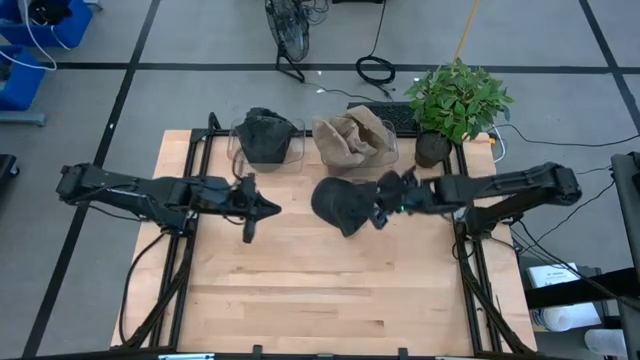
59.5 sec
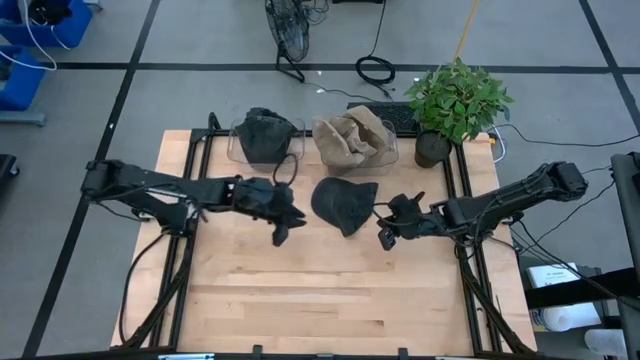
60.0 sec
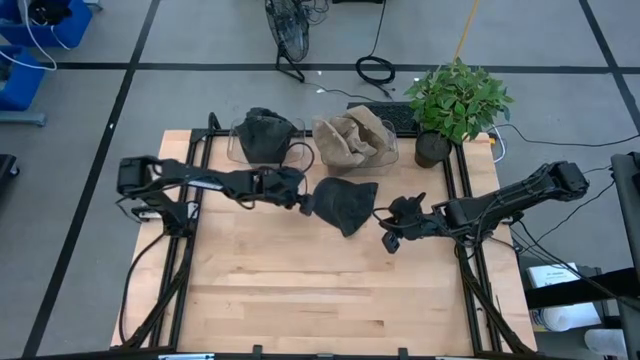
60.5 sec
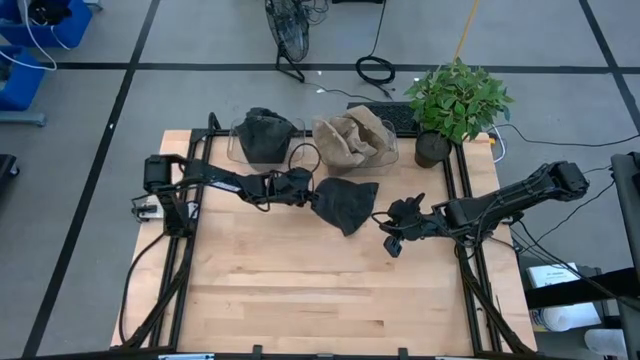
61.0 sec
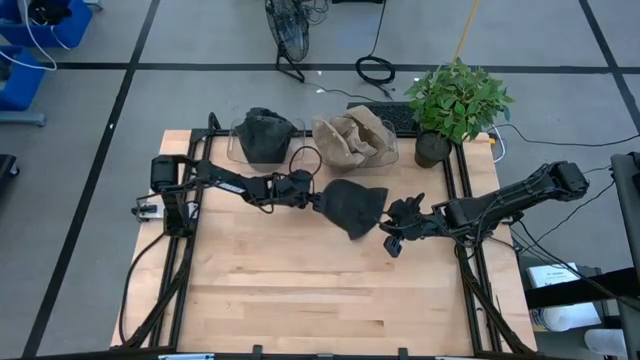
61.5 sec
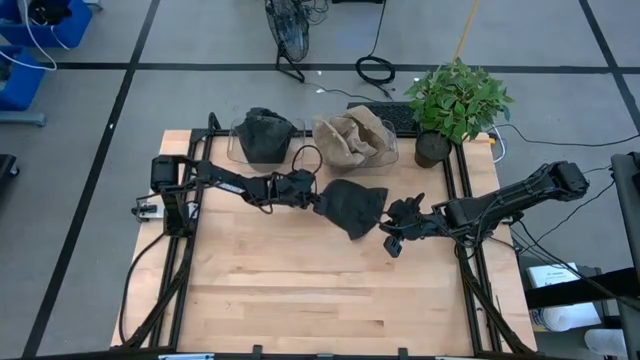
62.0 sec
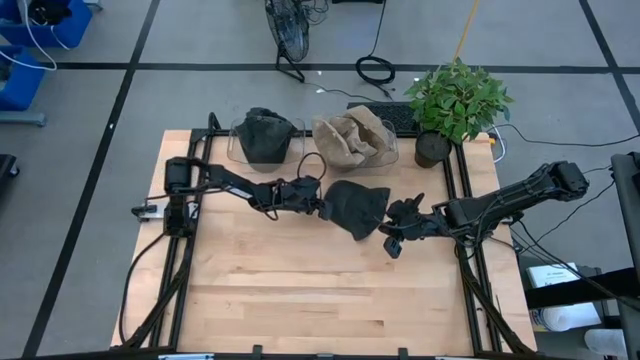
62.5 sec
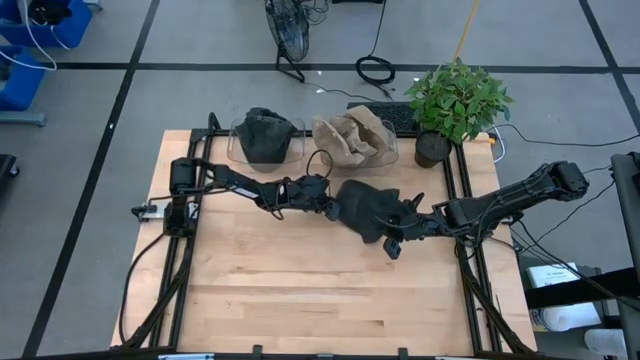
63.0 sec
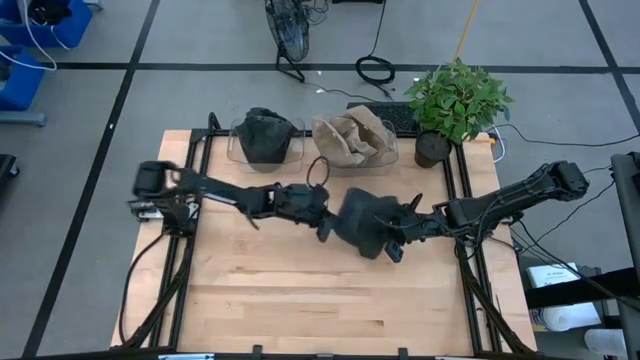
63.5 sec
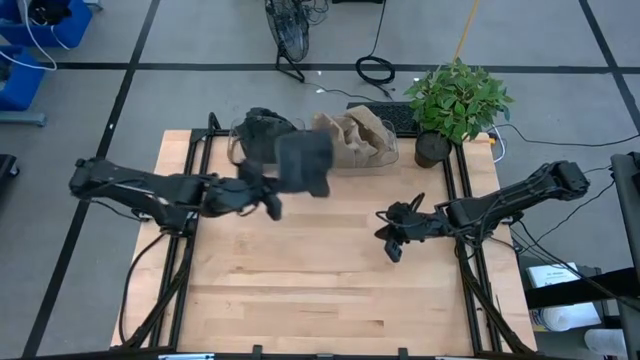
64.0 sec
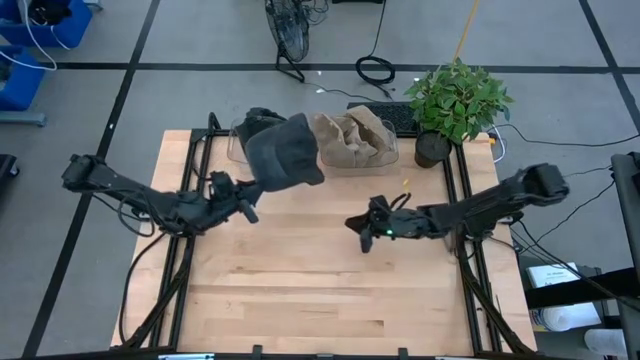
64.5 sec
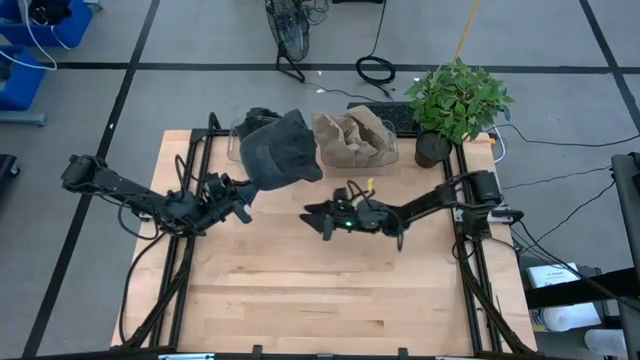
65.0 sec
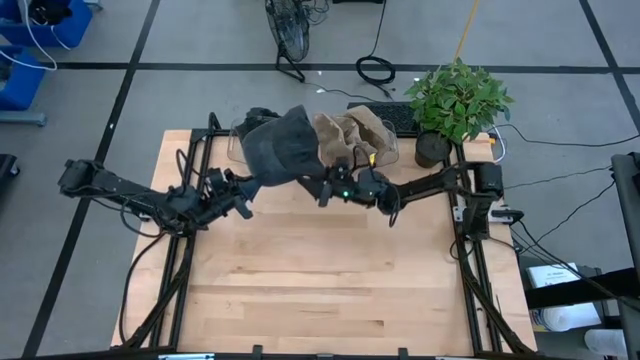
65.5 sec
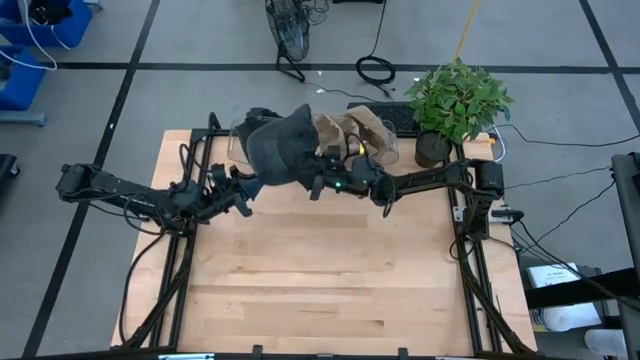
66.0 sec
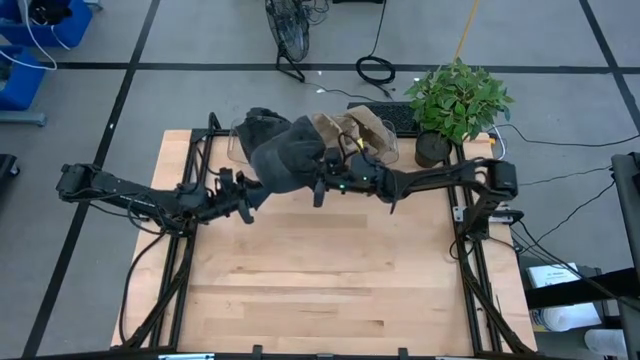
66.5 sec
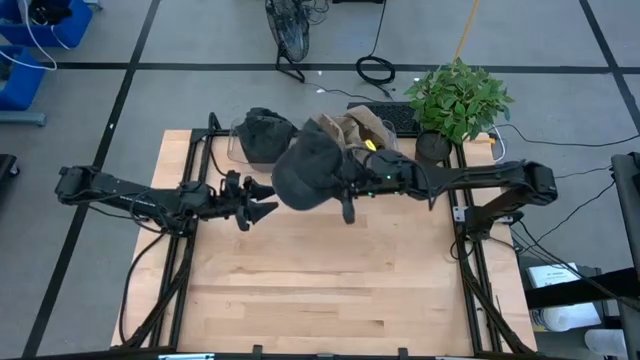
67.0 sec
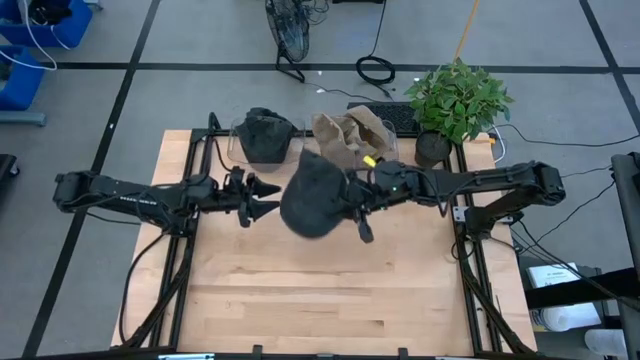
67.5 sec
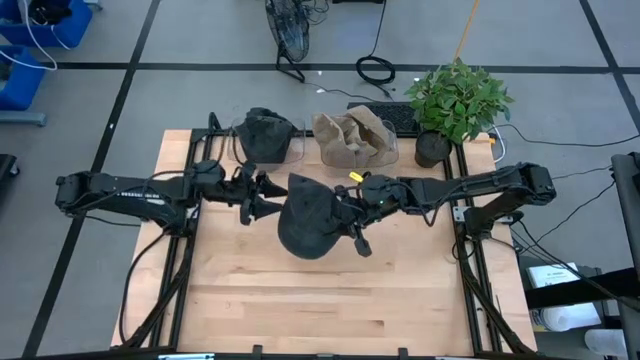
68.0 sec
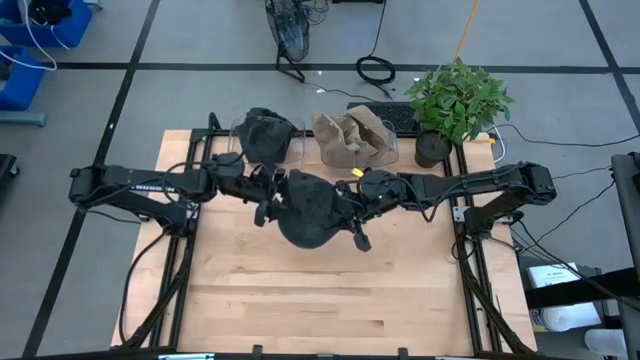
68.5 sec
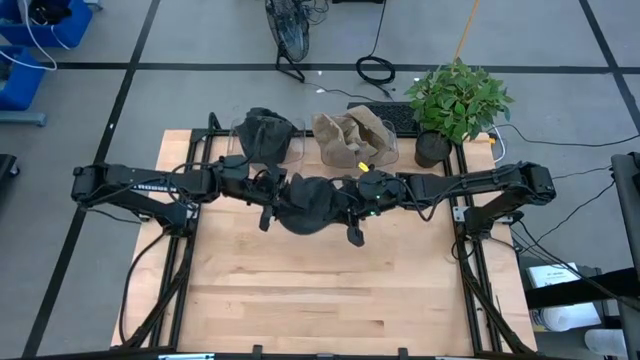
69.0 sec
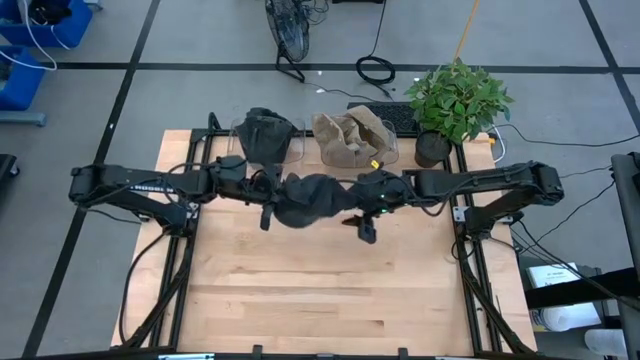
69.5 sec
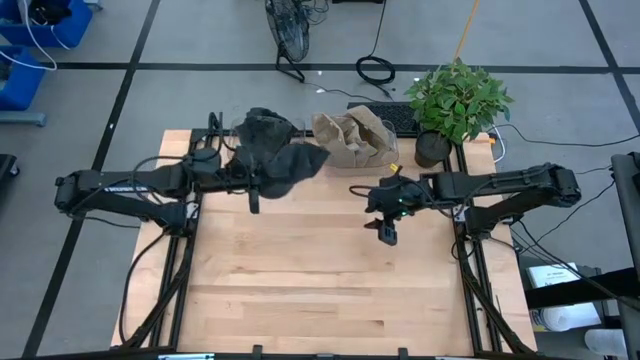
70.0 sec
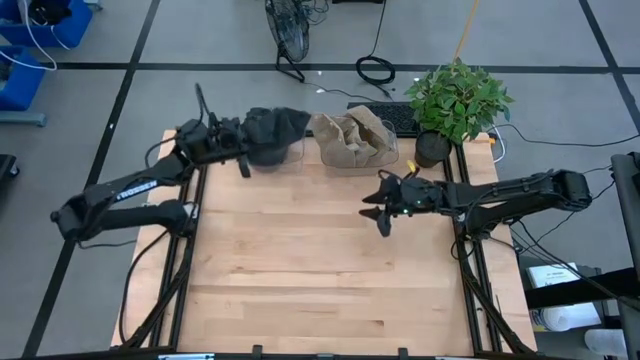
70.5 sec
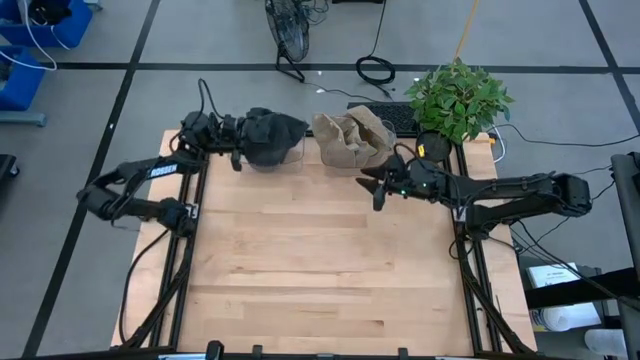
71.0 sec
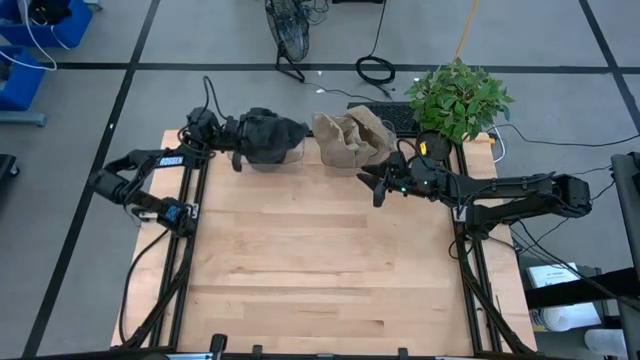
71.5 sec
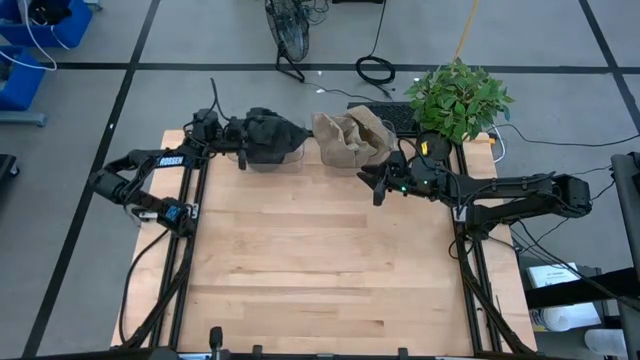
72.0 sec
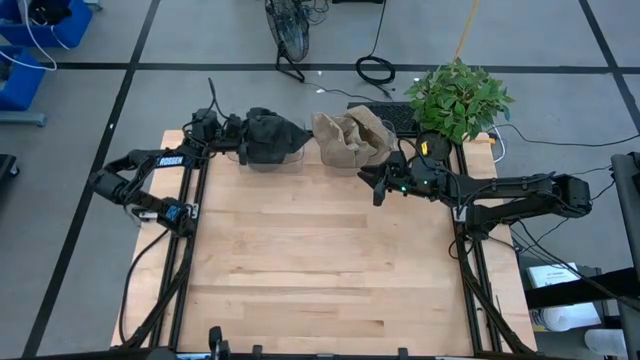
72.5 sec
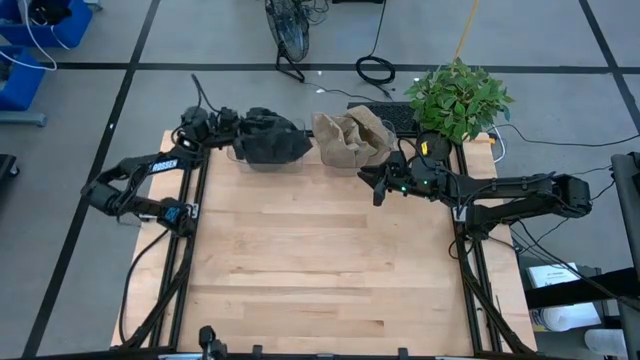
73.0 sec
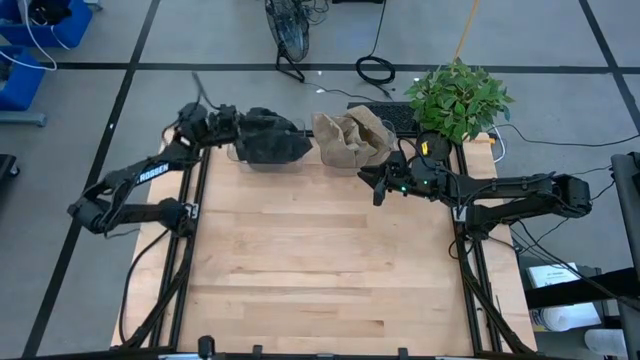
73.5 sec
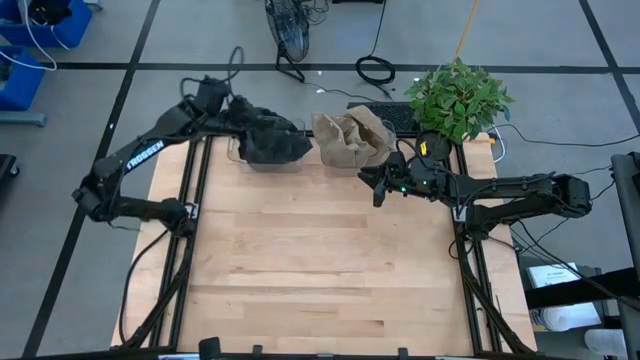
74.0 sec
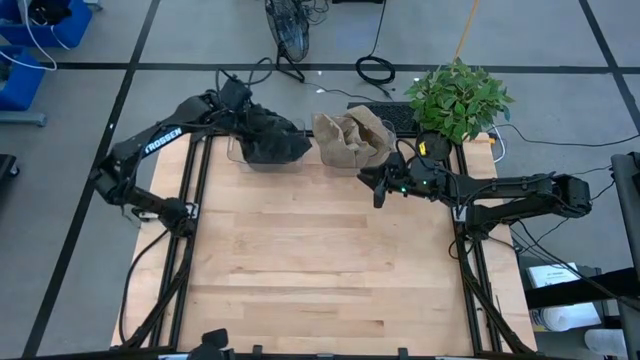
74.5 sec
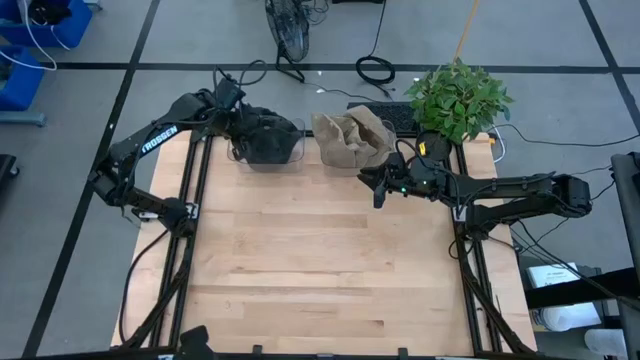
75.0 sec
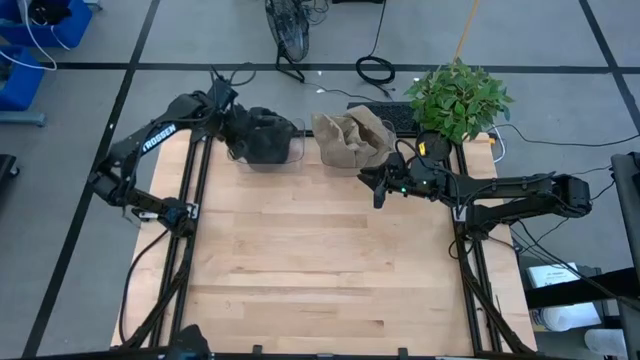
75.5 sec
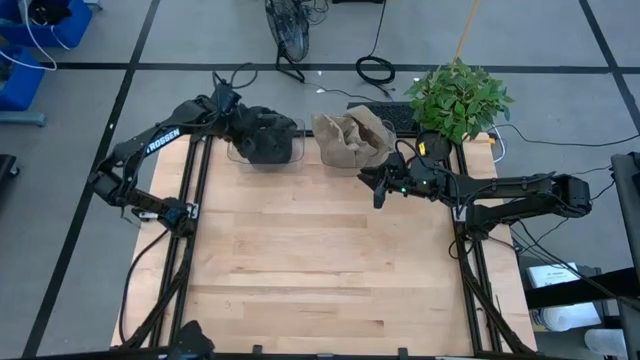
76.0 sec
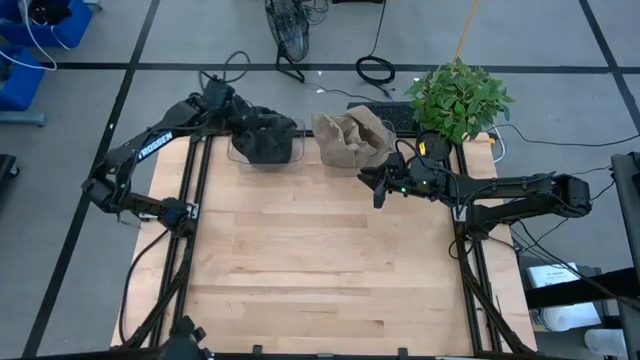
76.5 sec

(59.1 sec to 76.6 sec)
Task: Pick & Place hat
Put the black cap into the left transparent bin

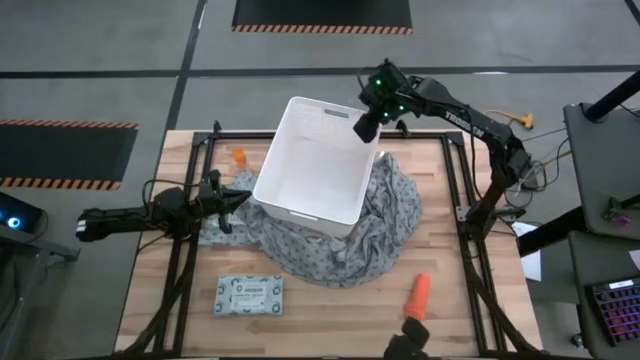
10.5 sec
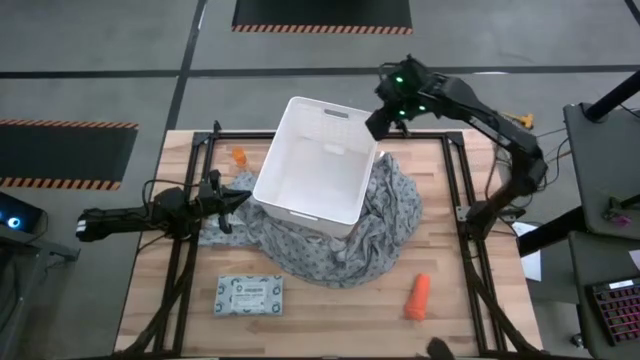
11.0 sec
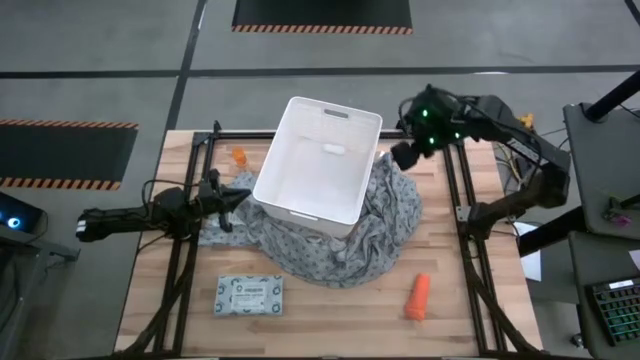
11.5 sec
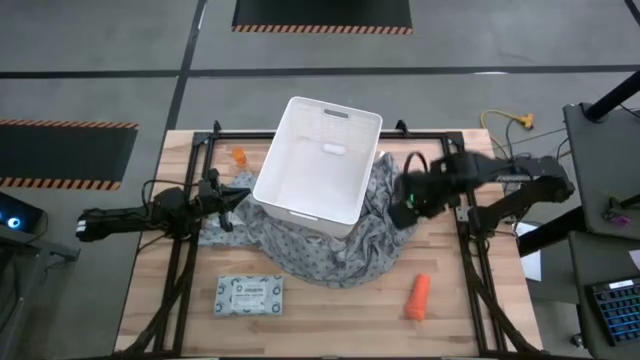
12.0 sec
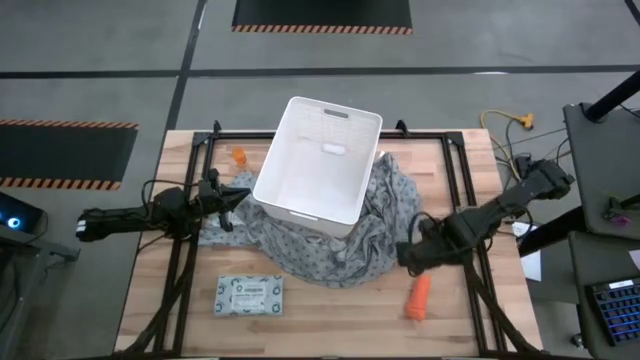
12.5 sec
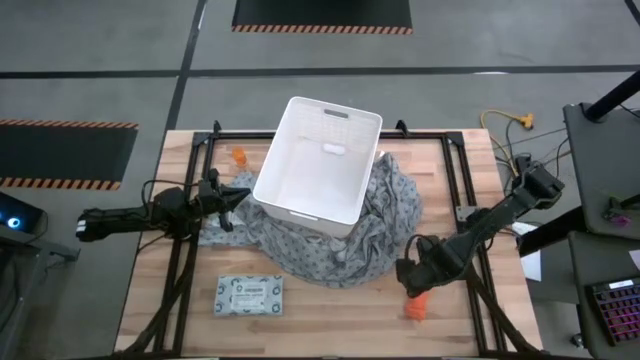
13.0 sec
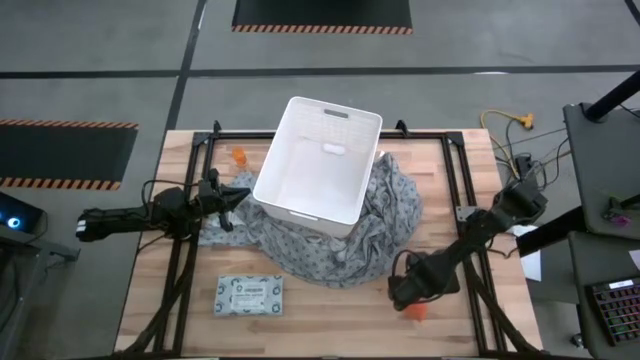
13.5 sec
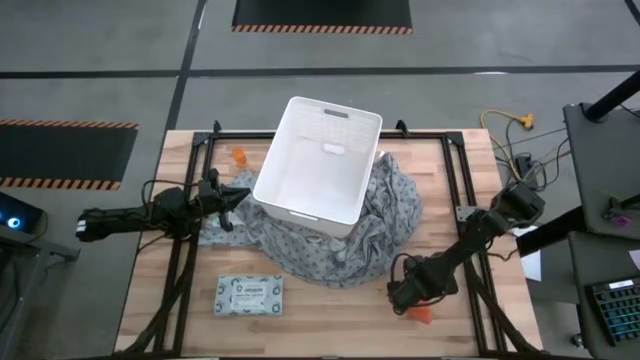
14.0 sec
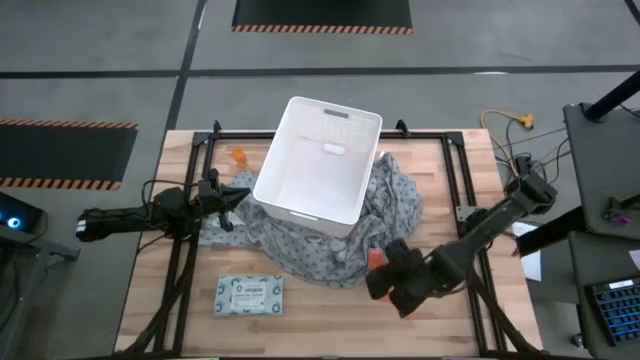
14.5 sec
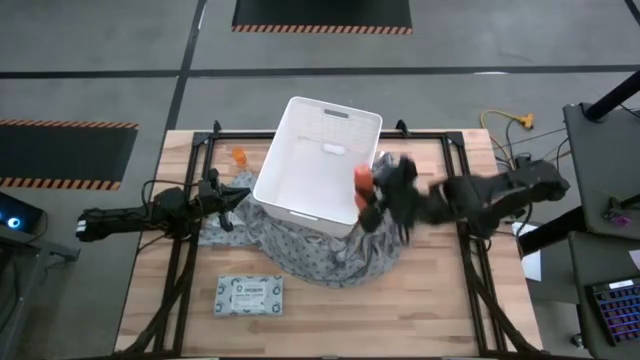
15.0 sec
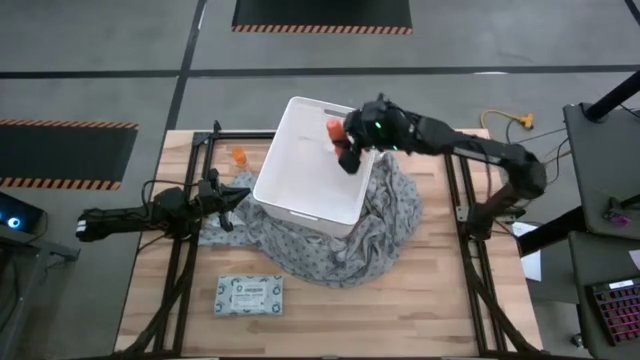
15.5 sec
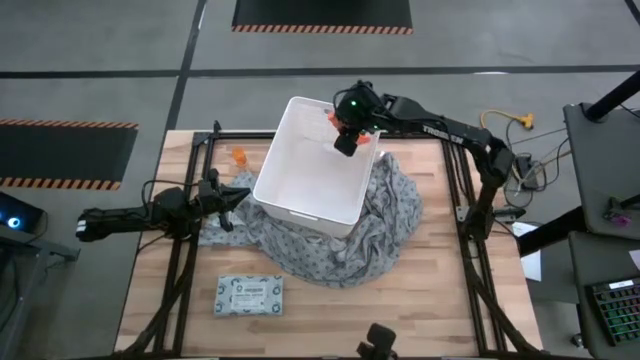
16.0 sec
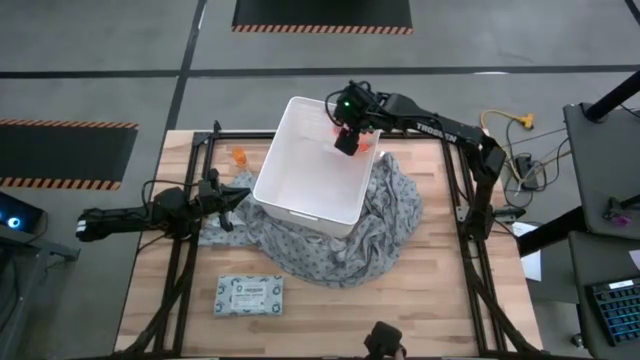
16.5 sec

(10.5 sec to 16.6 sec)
Task: Pick & place medical supplies in basket/bin
Put the orange bandage into the white bin
